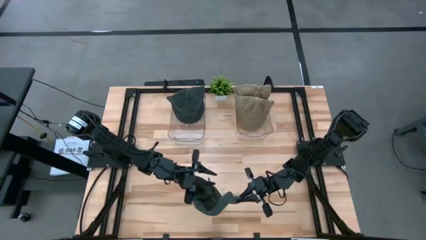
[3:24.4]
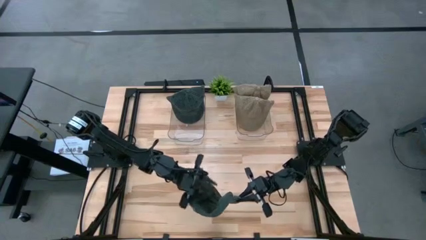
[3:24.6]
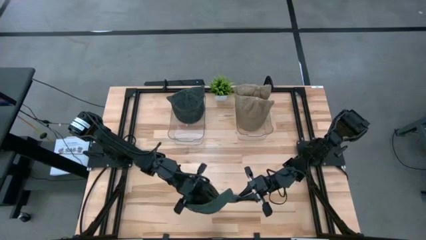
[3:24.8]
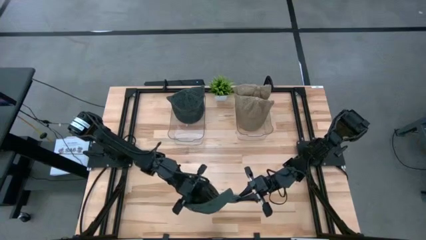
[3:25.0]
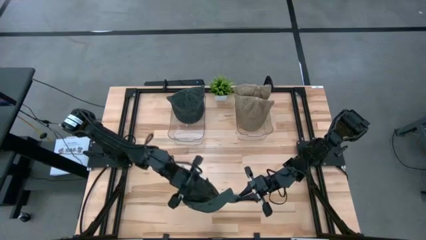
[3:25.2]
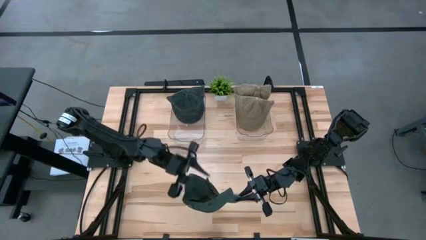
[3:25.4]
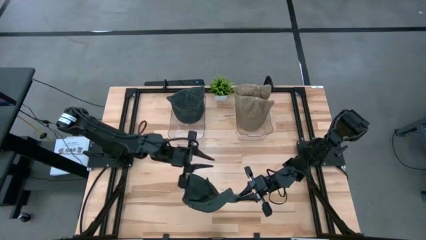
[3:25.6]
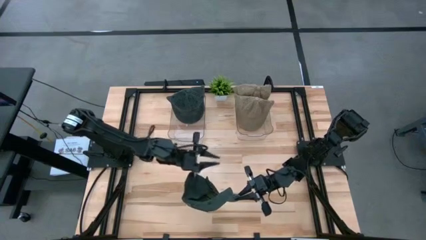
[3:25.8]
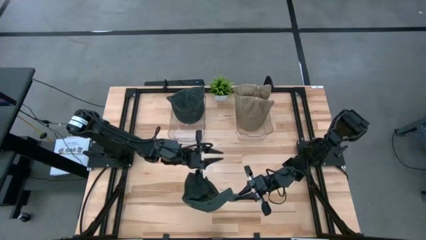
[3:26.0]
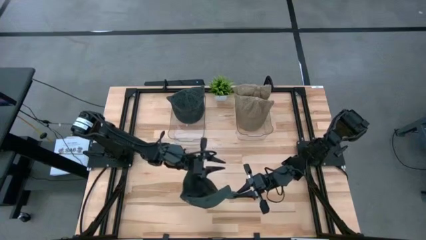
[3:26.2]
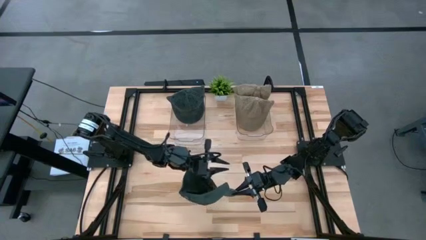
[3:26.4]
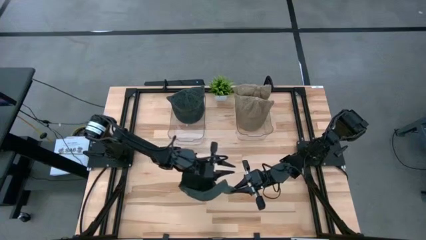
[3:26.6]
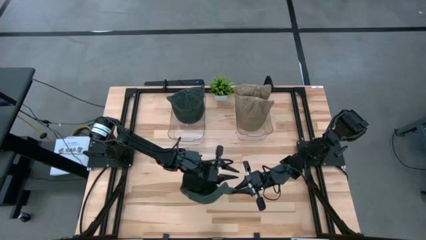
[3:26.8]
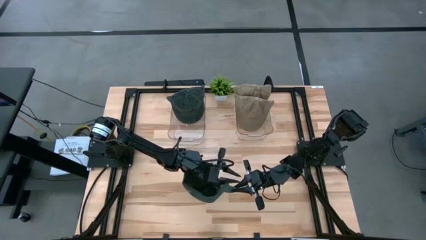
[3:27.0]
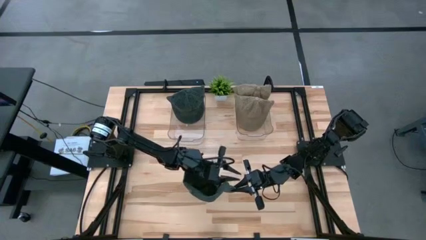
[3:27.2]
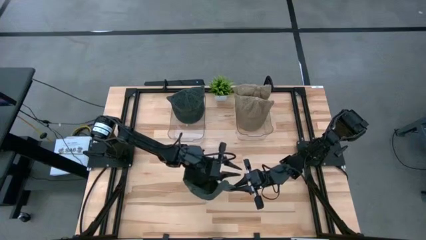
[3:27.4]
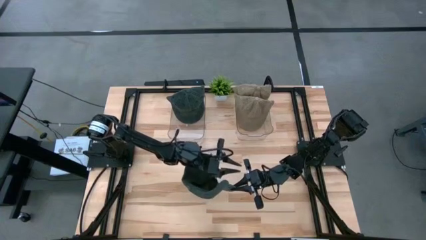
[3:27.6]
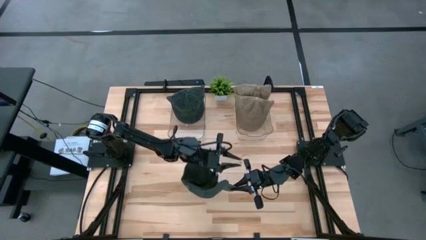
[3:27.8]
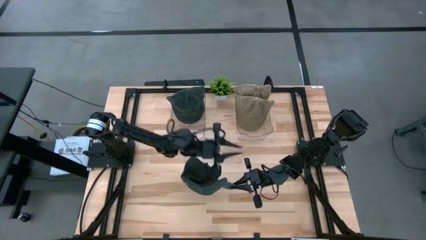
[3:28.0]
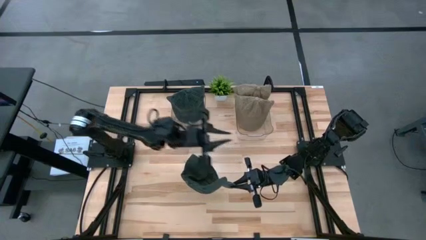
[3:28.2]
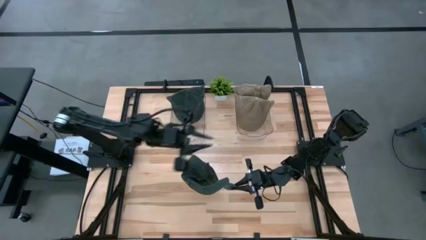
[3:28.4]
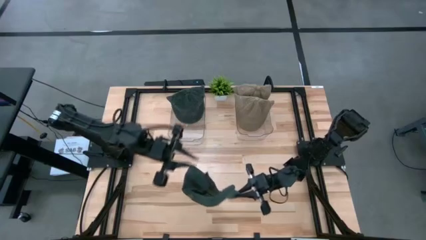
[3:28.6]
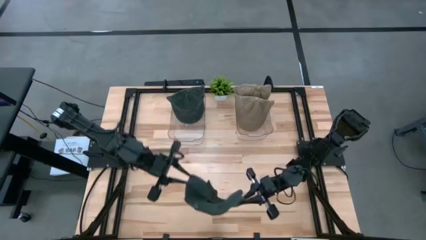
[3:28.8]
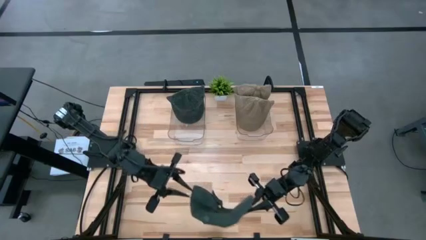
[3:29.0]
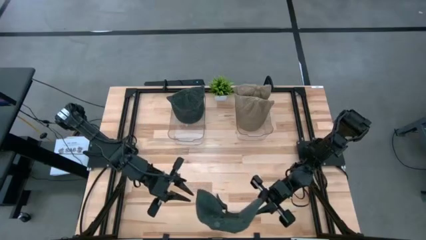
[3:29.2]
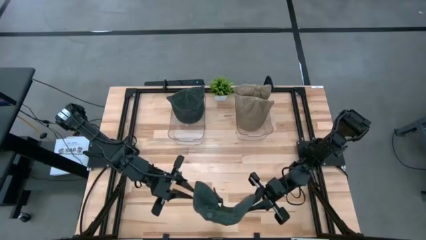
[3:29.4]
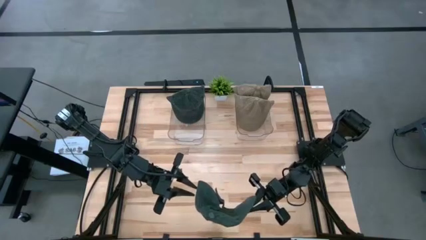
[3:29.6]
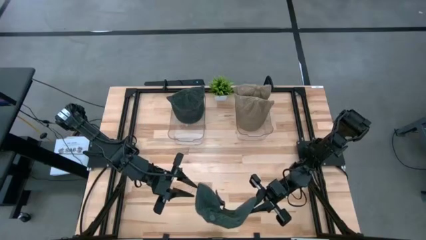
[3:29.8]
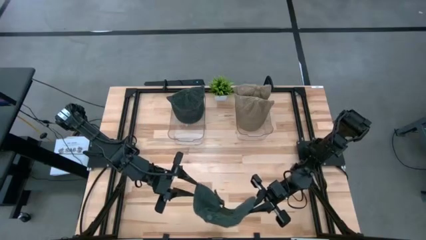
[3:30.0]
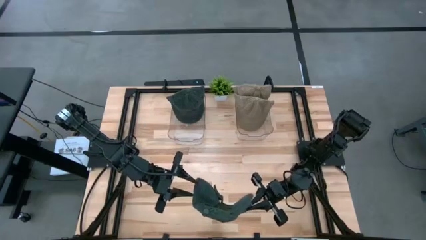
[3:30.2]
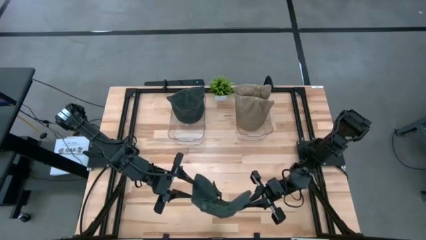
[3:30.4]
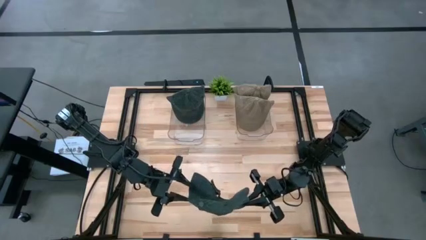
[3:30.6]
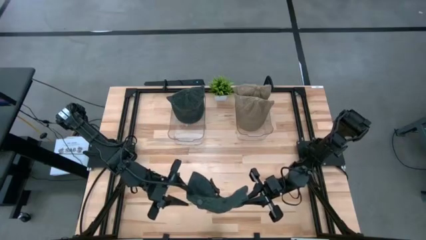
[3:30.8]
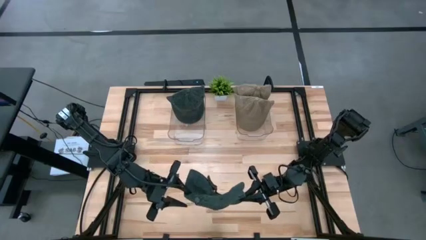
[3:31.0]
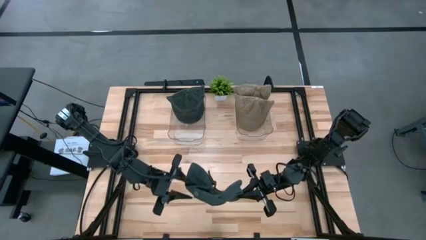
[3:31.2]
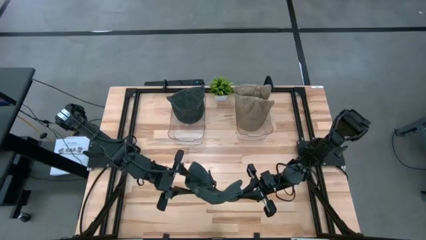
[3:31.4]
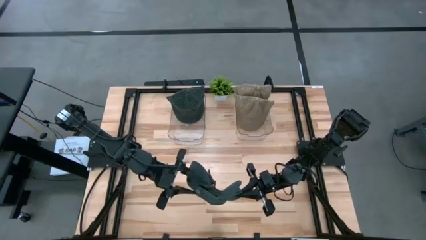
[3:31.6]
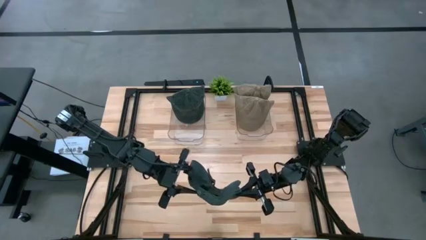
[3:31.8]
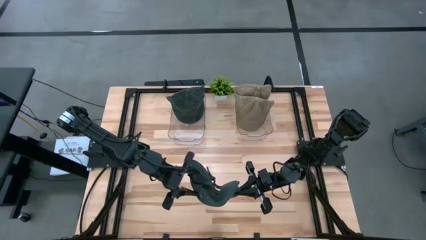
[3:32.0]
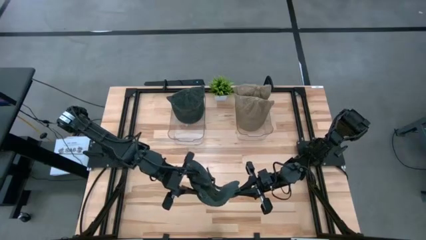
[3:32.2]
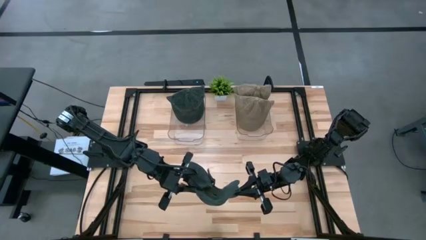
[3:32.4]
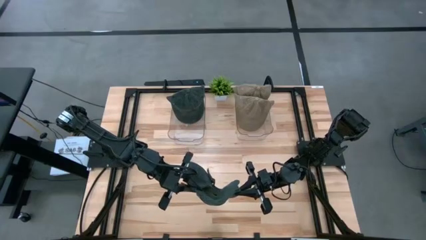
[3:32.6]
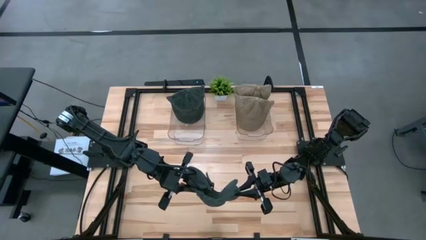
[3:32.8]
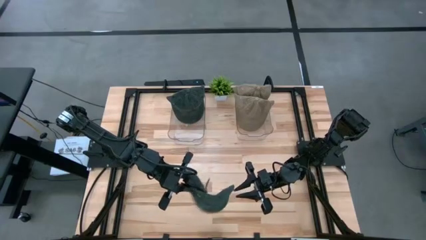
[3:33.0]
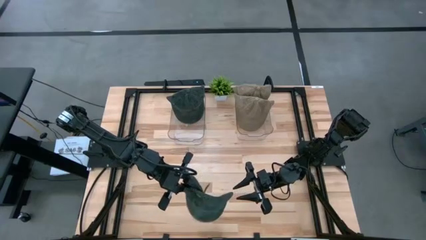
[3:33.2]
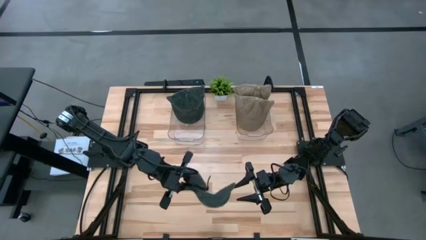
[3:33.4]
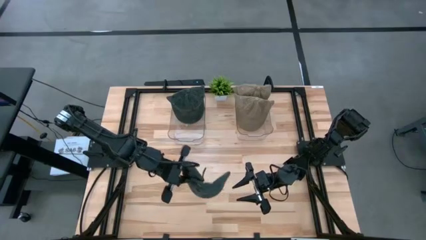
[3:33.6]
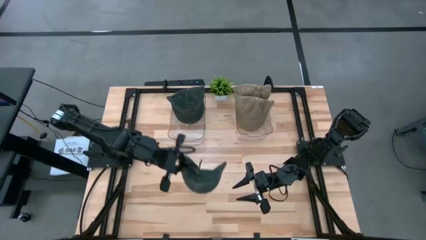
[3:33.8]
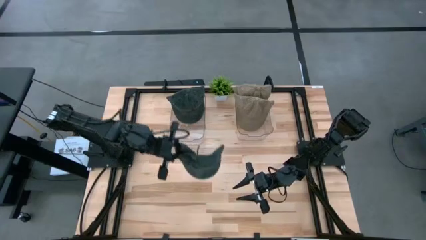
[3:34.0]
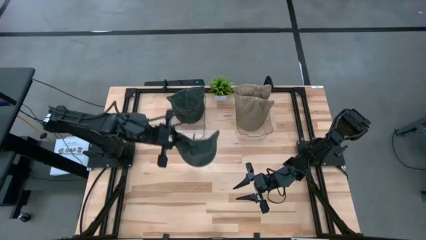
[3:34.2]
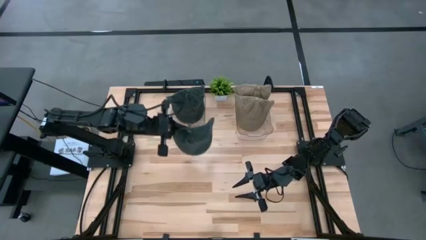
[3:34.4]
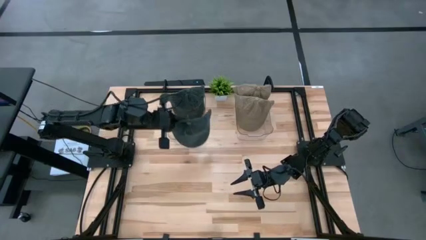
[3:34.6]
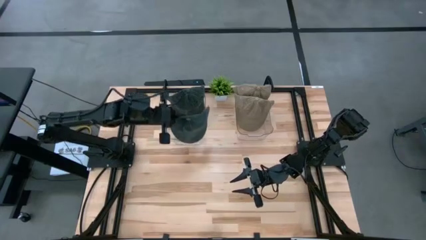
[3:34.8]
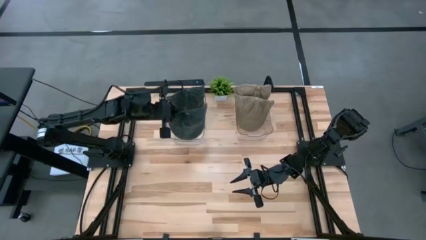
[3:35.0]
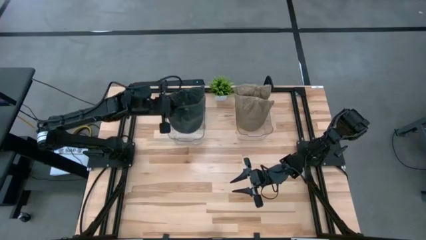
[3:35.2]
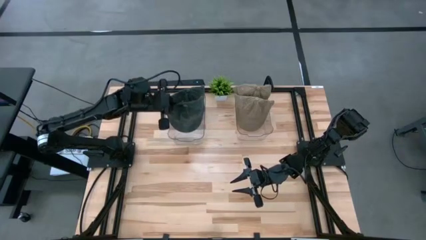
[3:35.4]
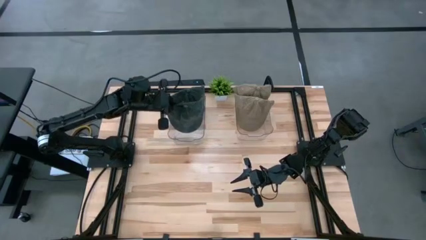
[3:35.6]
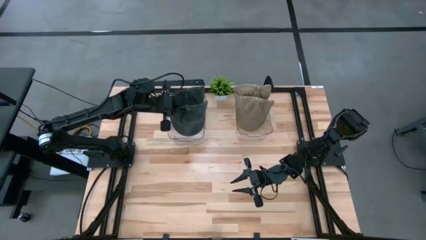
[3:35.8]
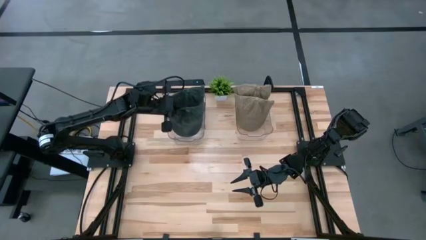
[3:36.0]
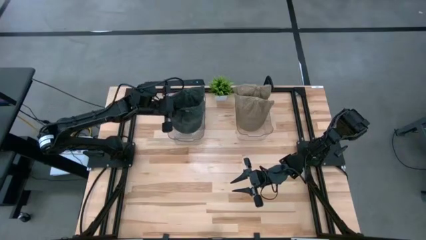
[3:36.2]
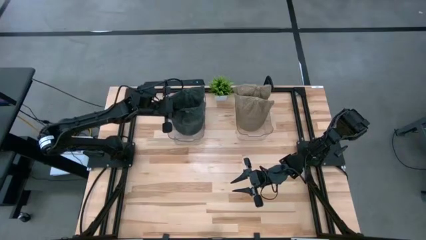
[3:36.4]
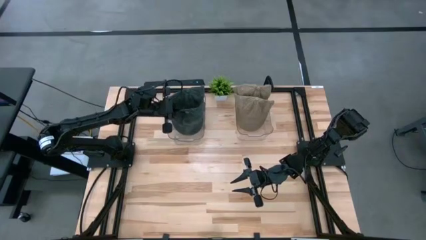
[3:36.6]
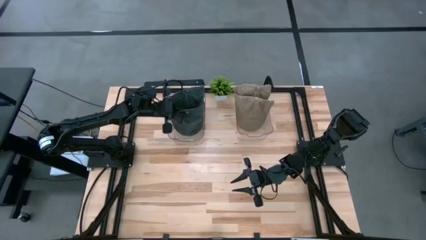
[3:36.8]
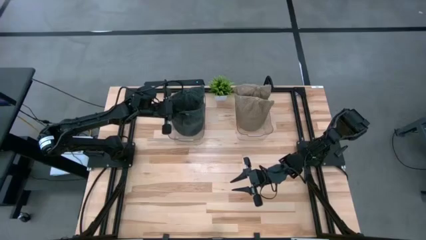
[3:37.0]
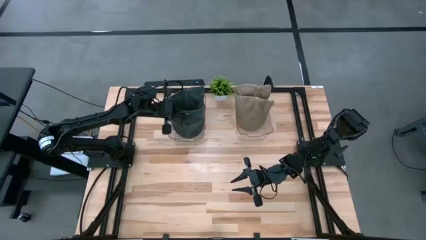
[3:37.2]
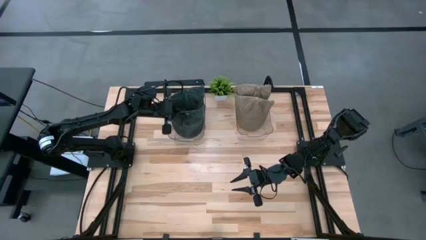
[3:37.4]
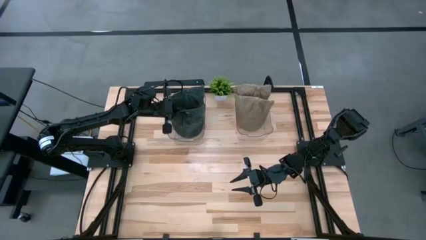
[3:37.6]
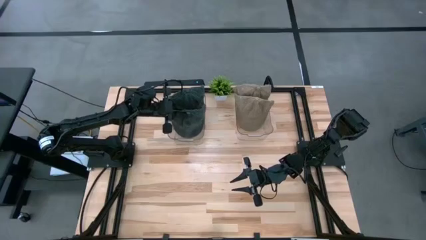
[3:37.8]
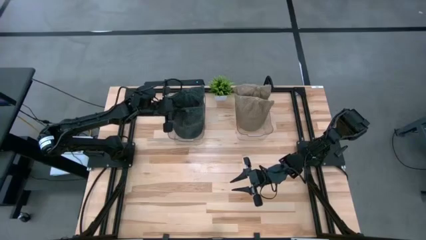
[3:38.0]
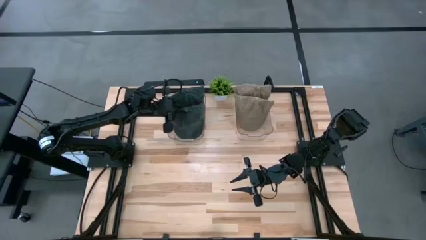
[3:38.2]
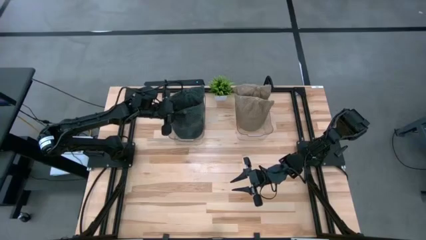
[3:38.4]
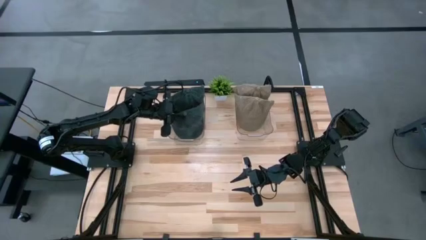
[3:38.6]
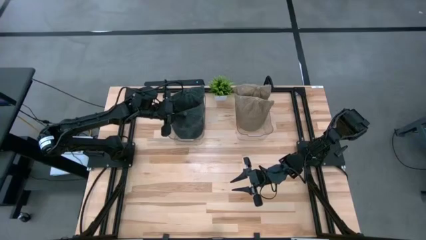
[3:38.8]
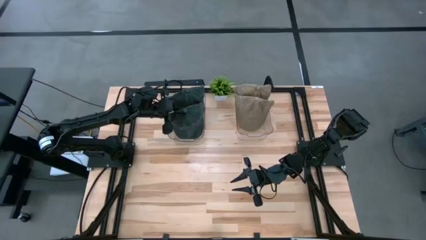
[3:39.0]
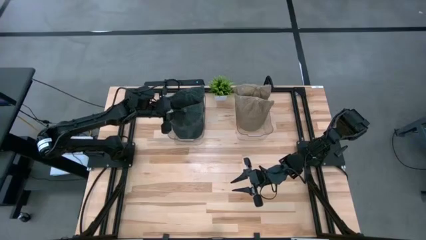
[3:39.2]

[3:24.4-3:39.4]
Task: Pick & Place hat
Put the black cap into the left transparent container
